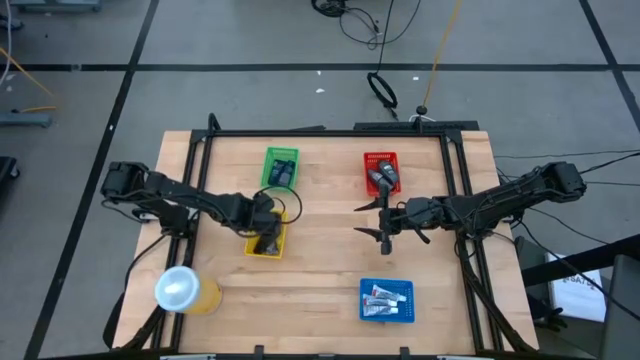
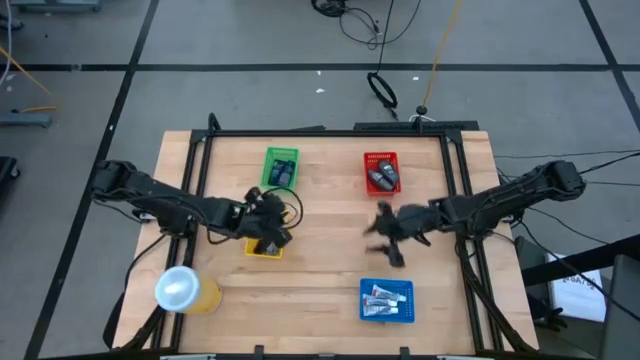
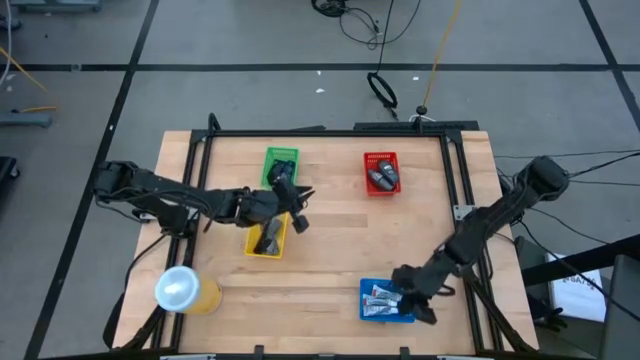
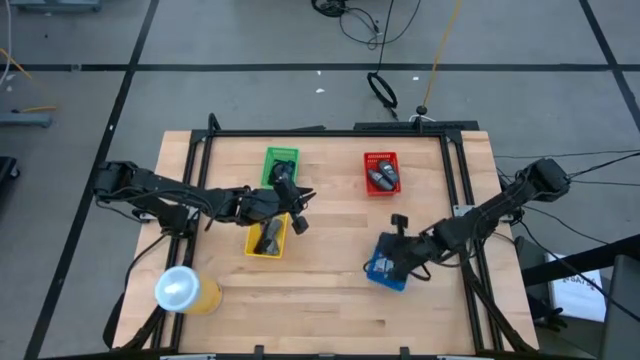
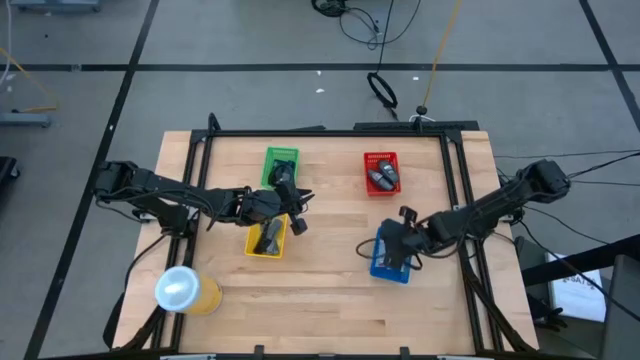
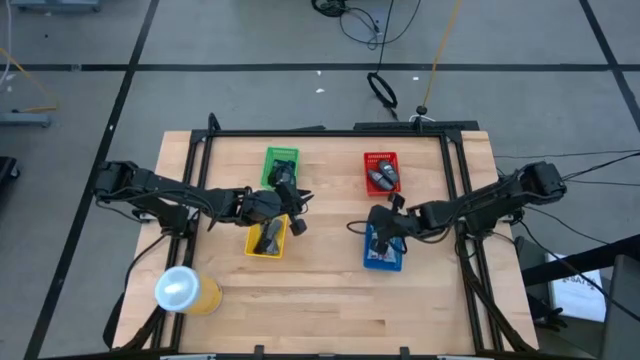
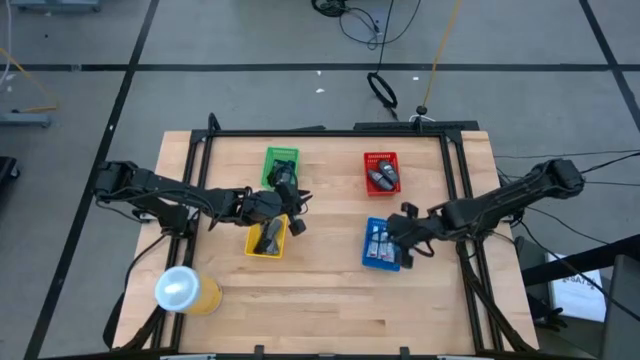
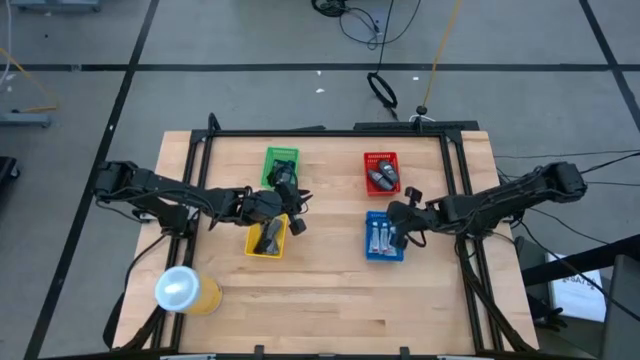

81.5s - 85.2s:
Task: Pick & Place Travel size toiletries
Adjust the blue bin

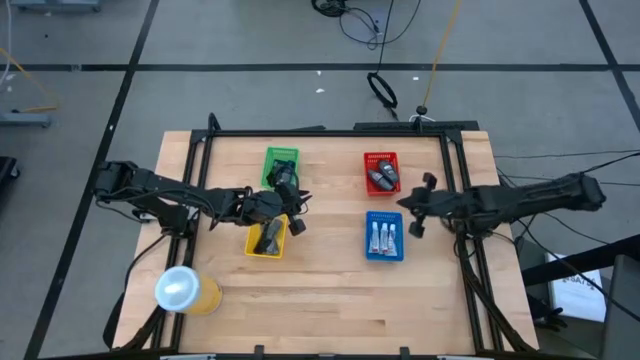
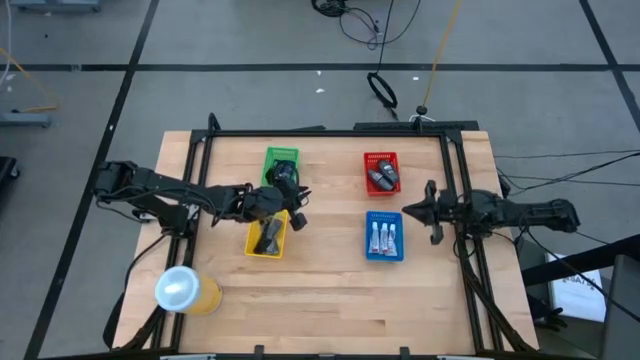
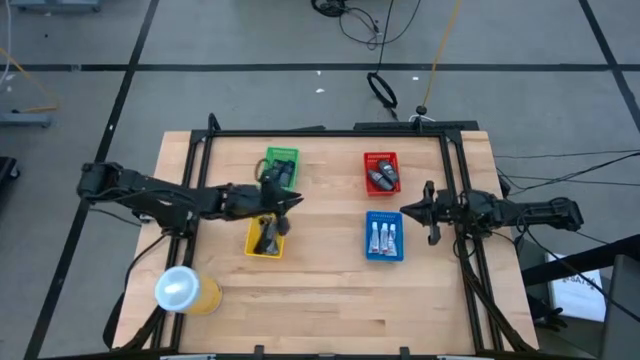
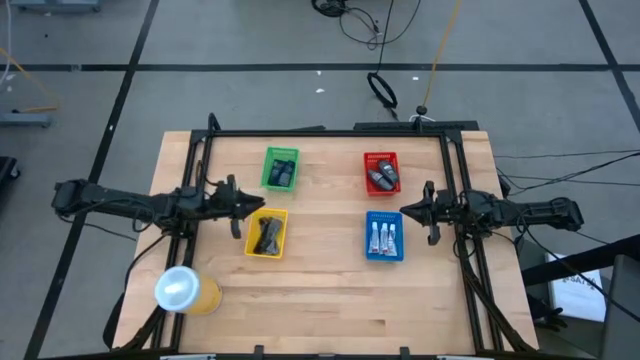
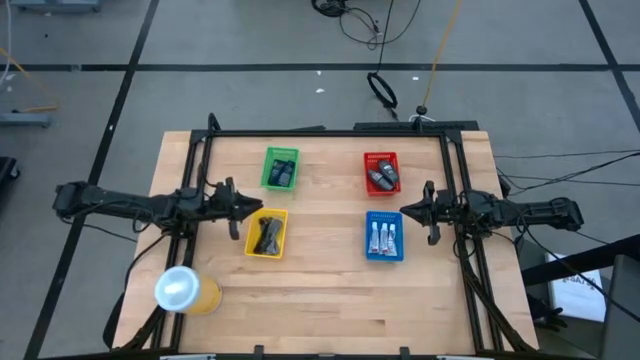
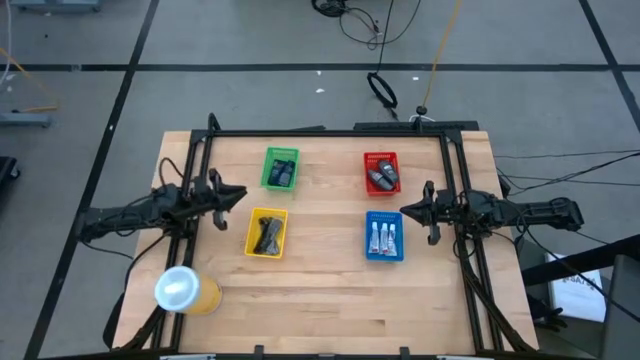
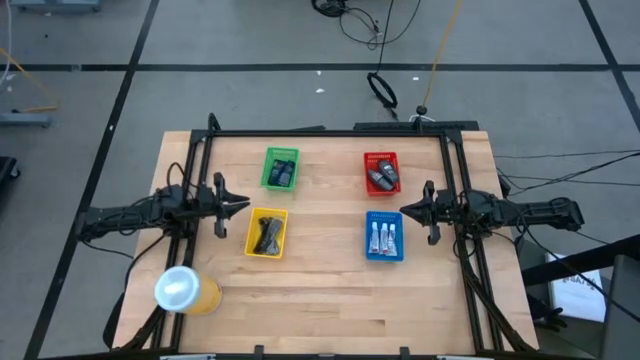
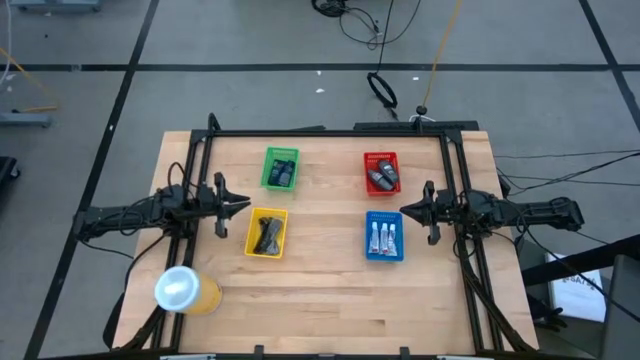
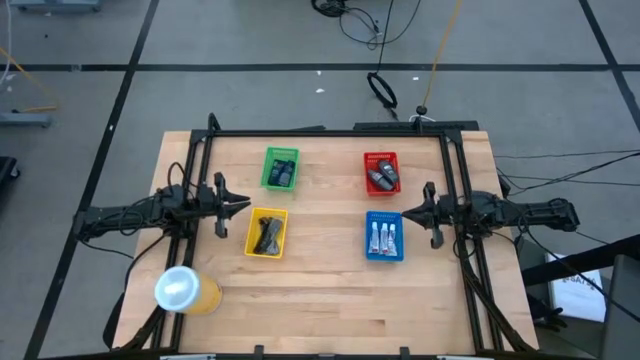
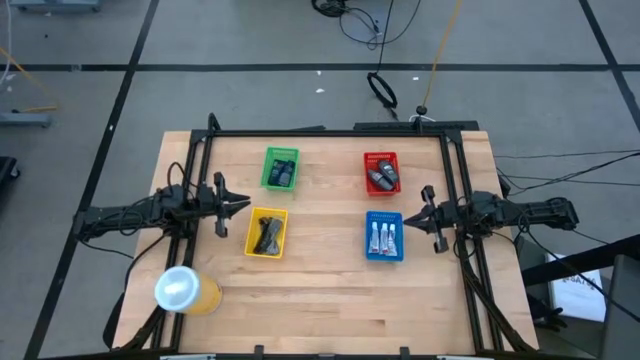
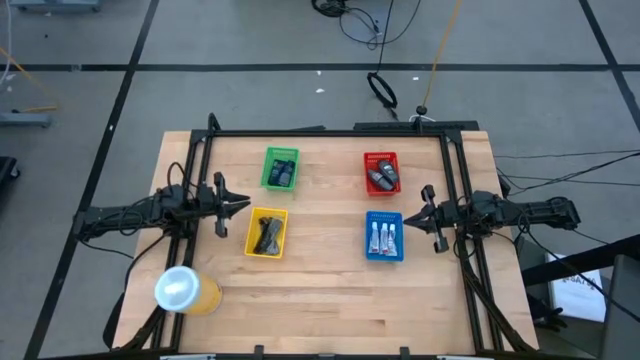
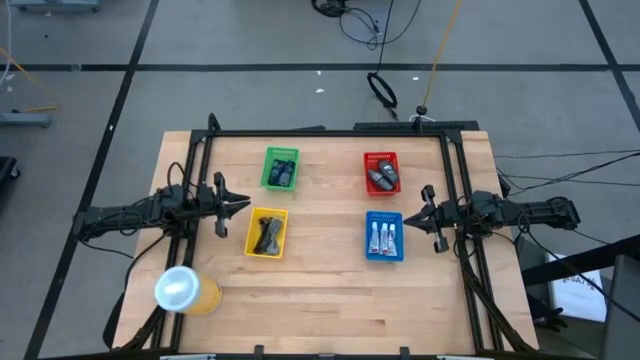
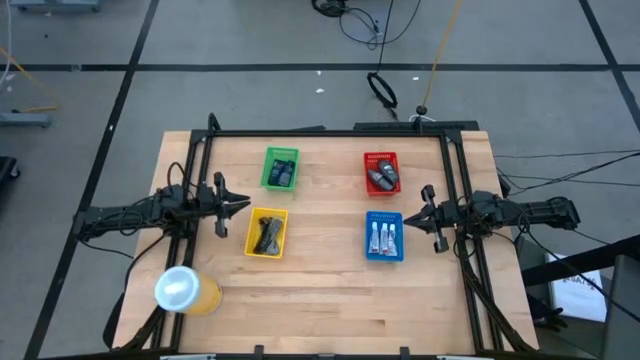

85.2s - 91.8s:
Return to Home Position

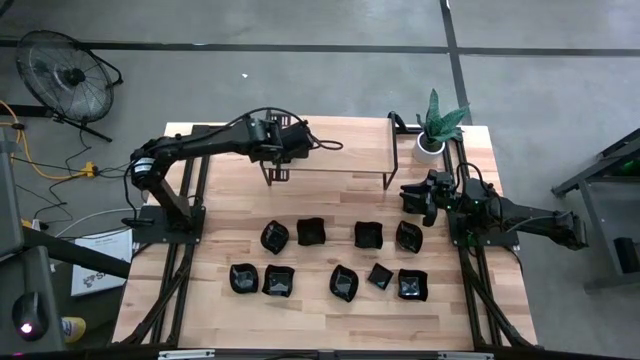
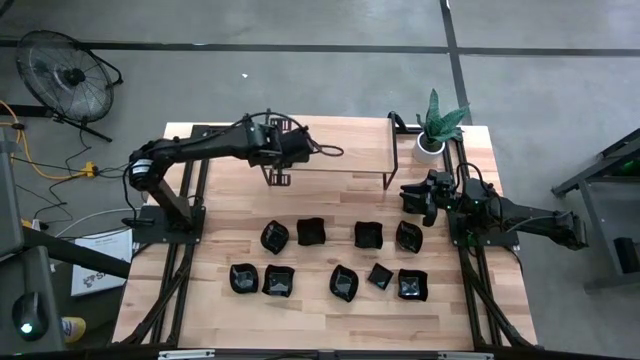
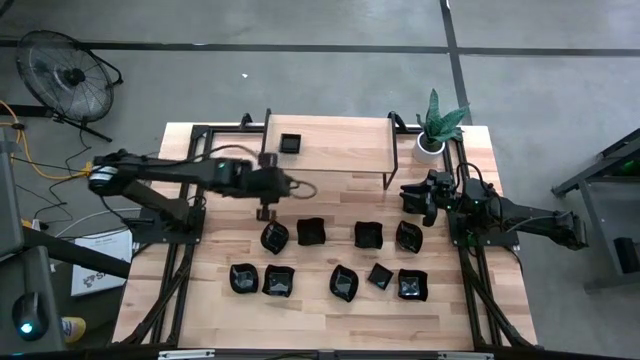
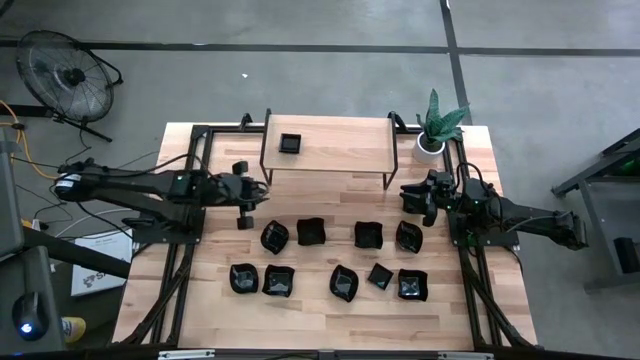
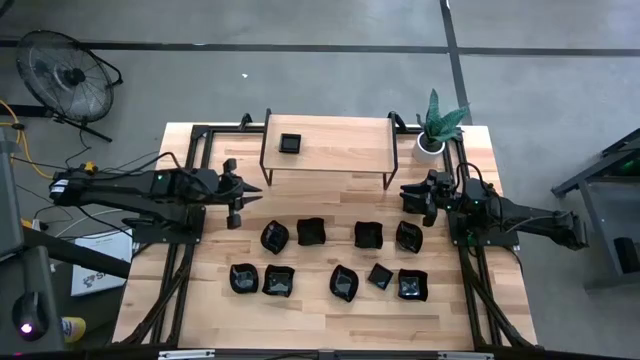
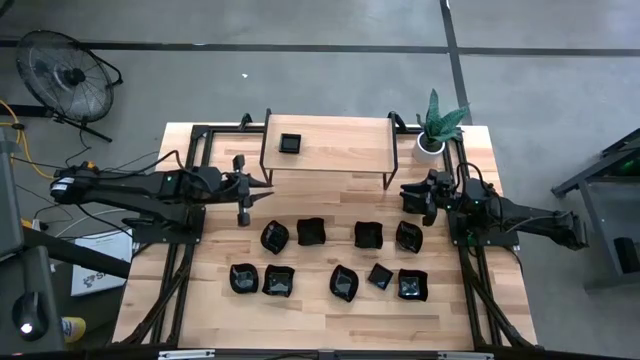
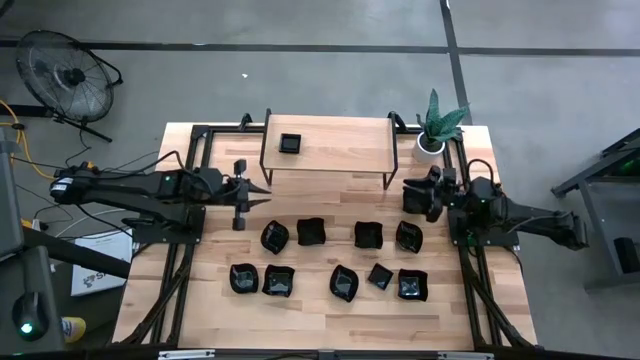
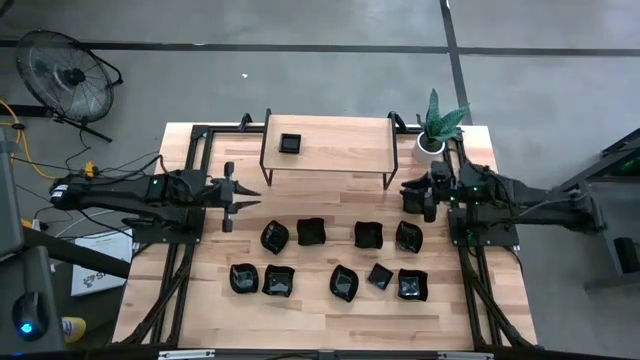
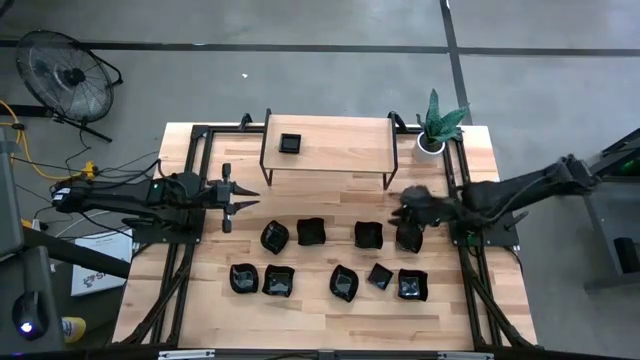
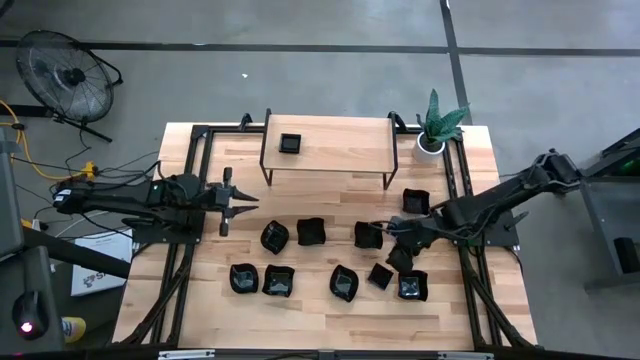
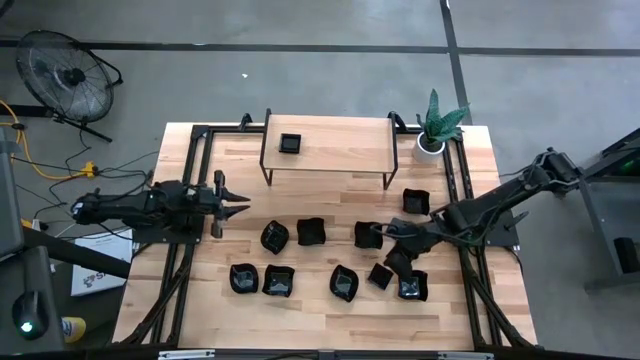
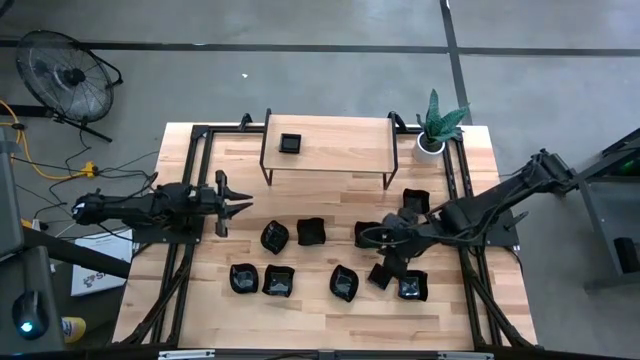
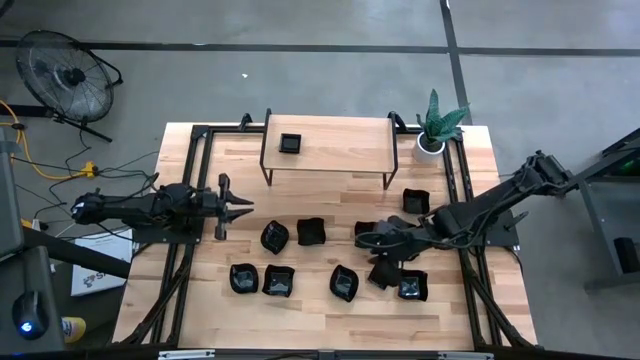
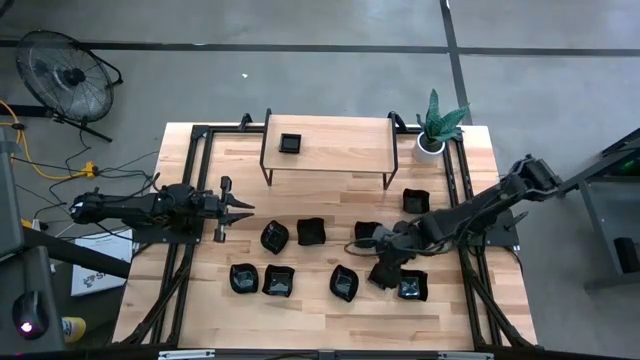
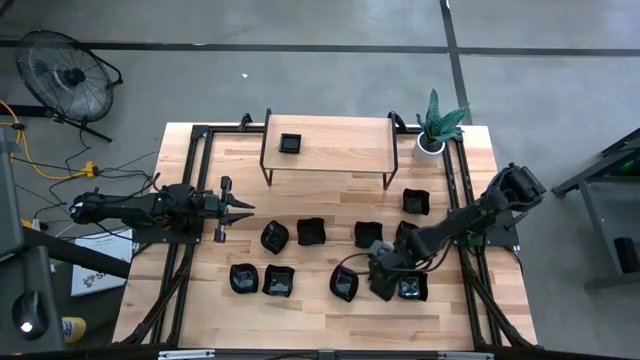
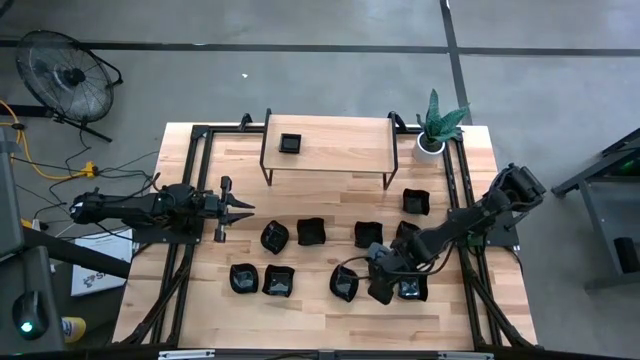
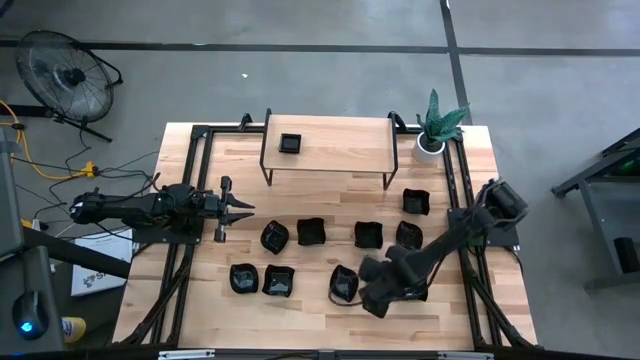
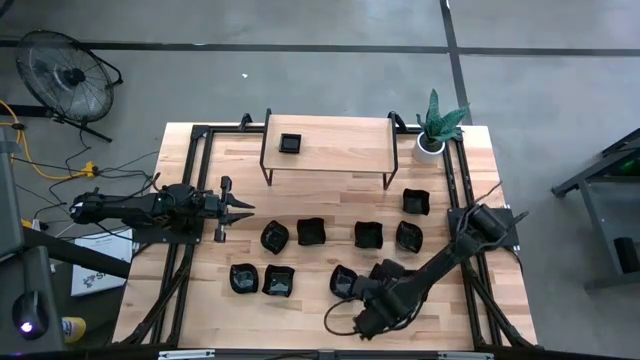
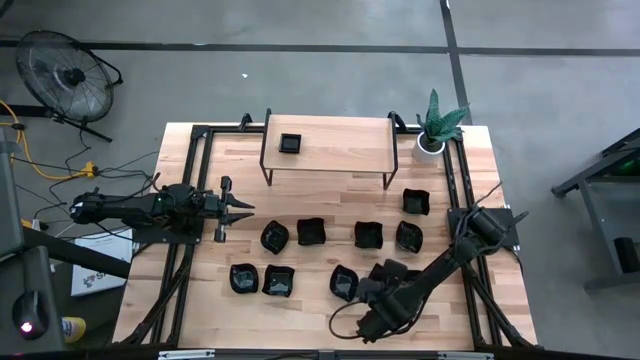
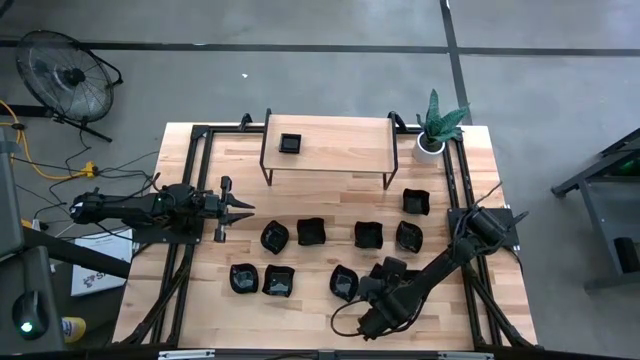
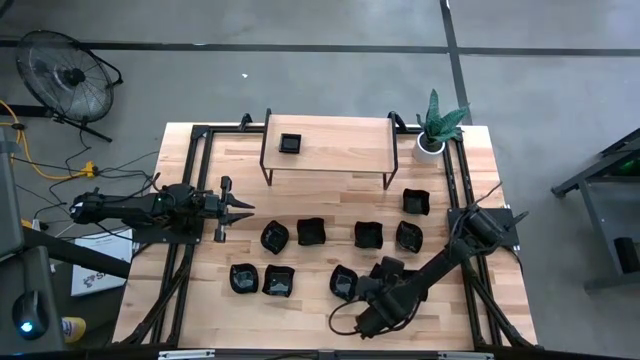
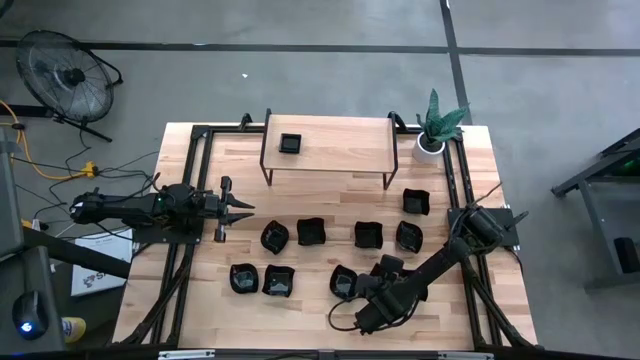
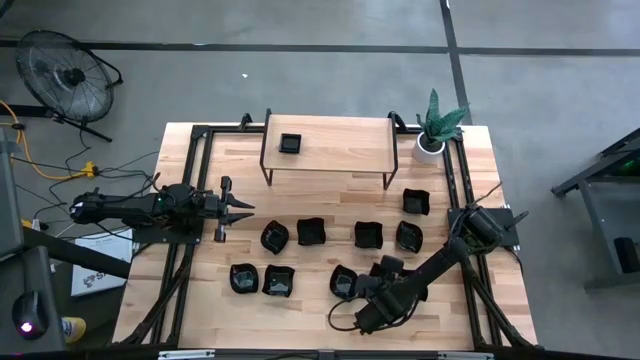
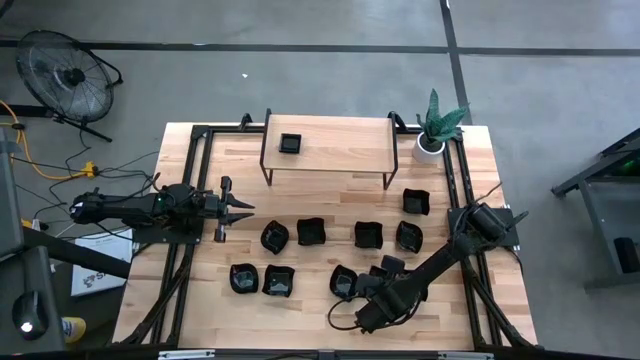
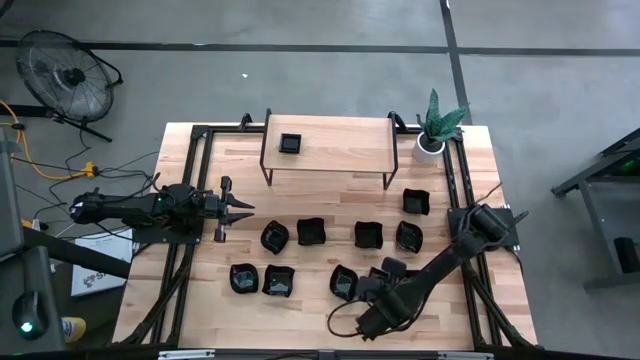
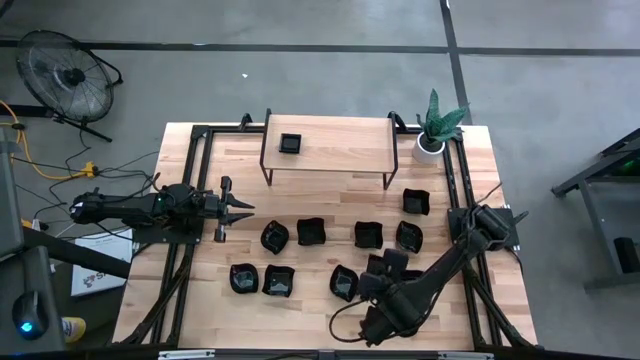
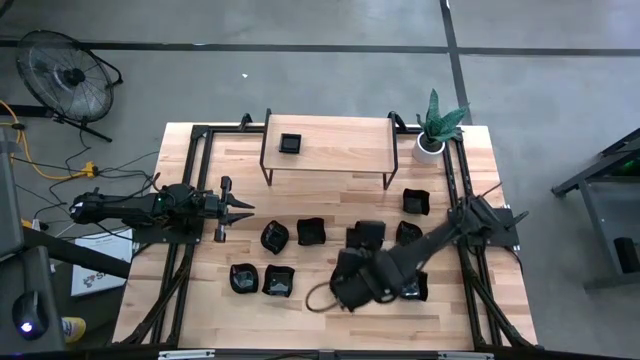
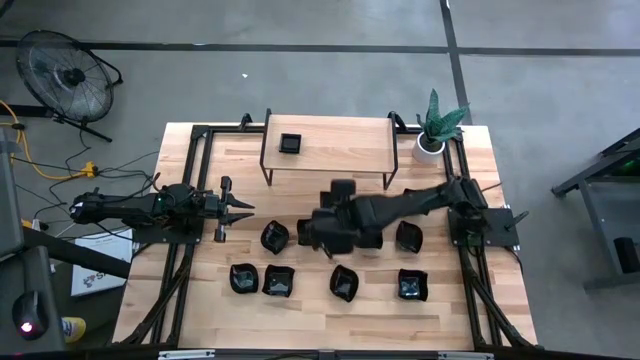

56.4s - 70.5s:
Task: Pick & Place Mini shaped plates
Stack the black square plate on top of the stacked black square plates on the shelf
